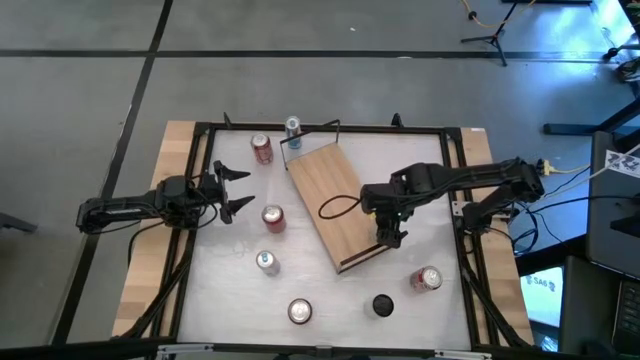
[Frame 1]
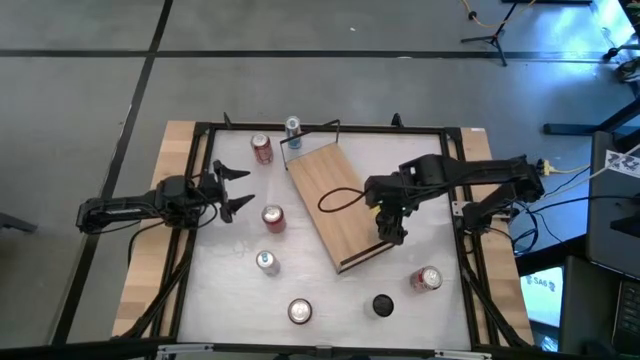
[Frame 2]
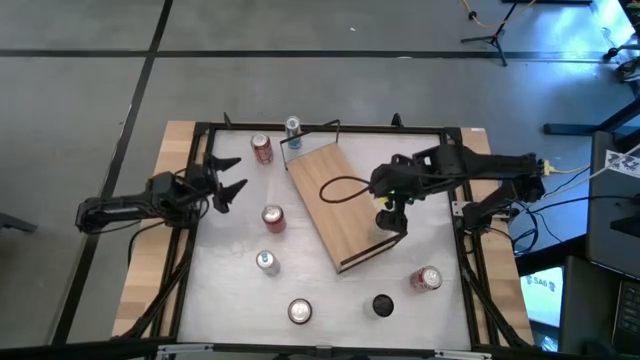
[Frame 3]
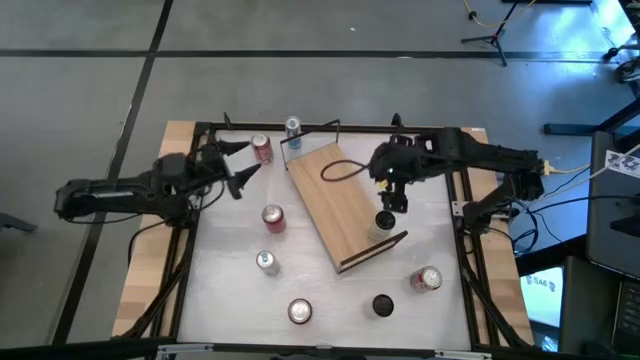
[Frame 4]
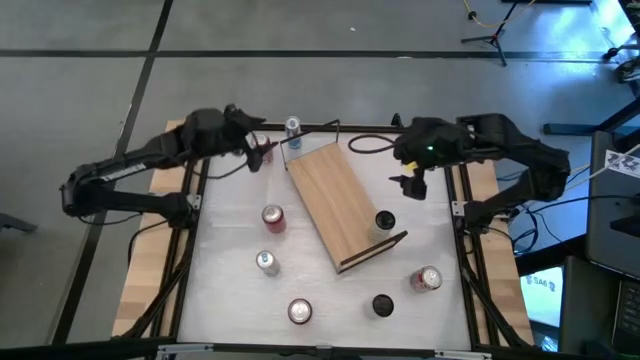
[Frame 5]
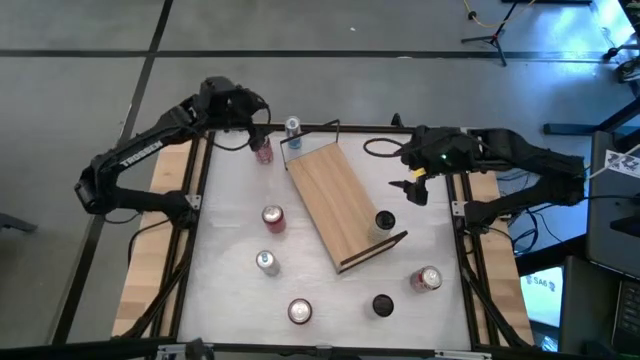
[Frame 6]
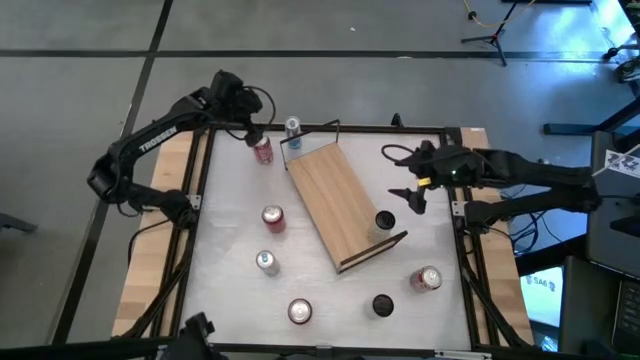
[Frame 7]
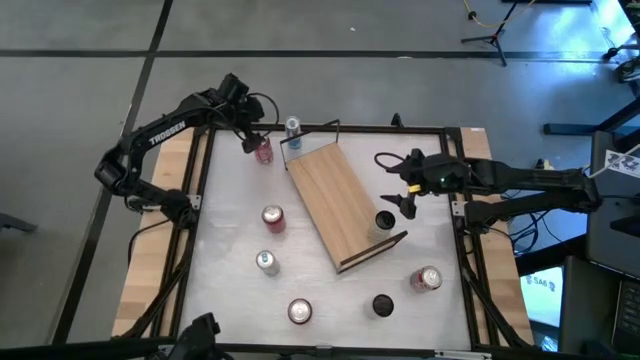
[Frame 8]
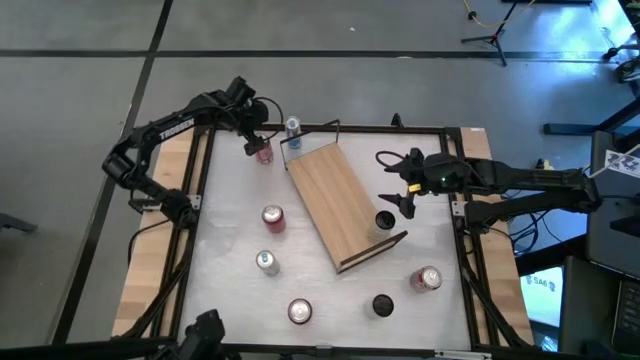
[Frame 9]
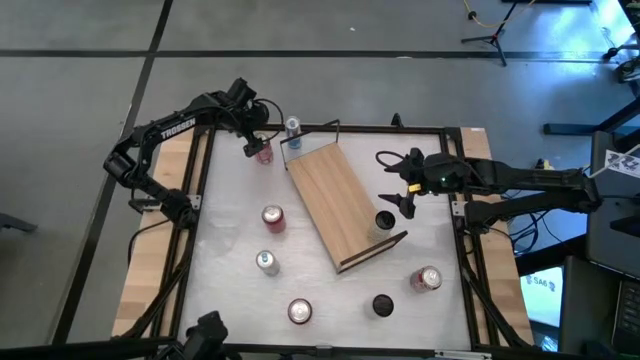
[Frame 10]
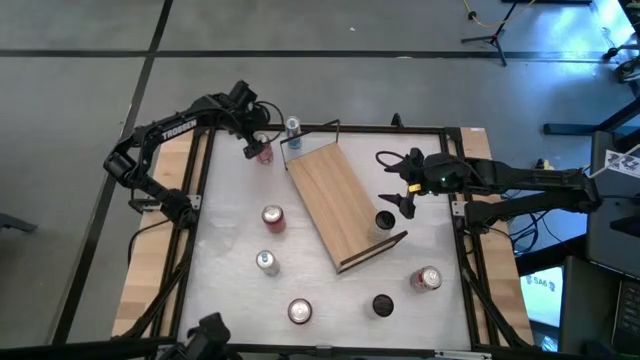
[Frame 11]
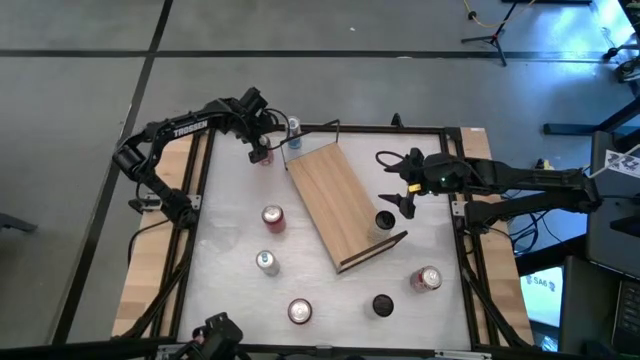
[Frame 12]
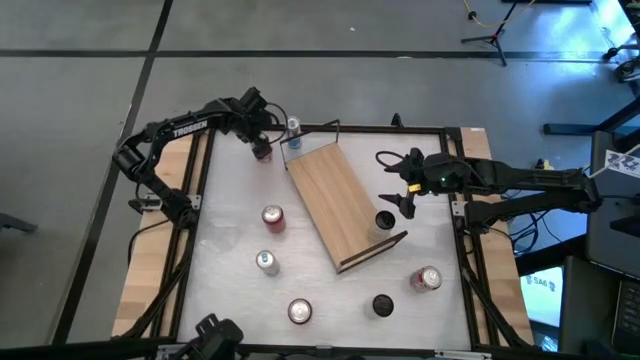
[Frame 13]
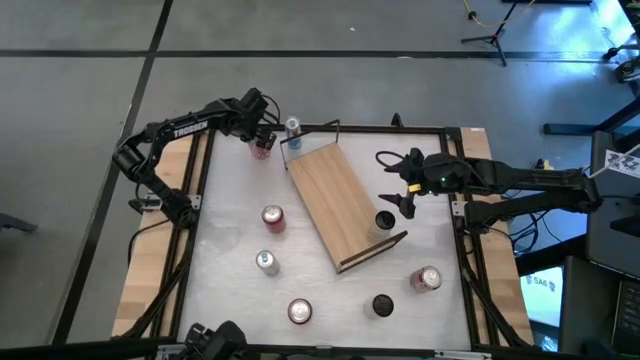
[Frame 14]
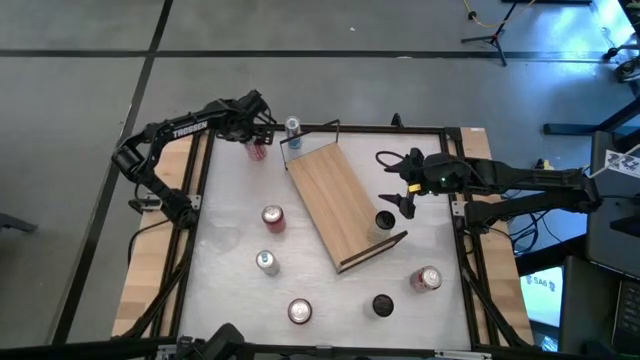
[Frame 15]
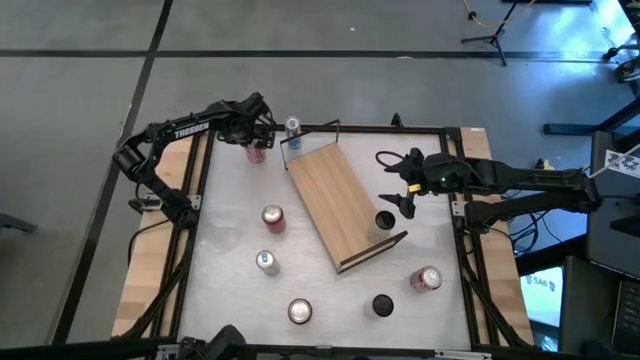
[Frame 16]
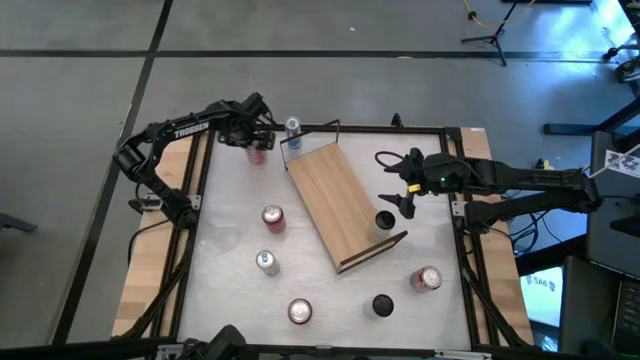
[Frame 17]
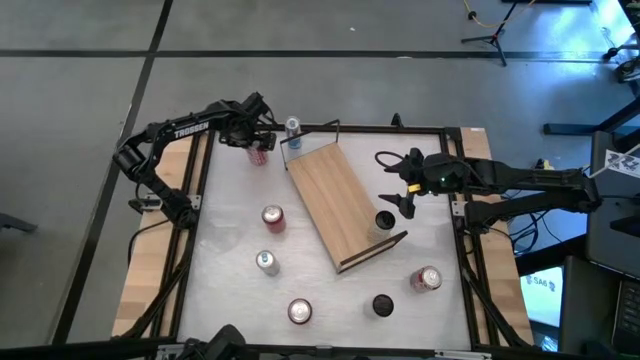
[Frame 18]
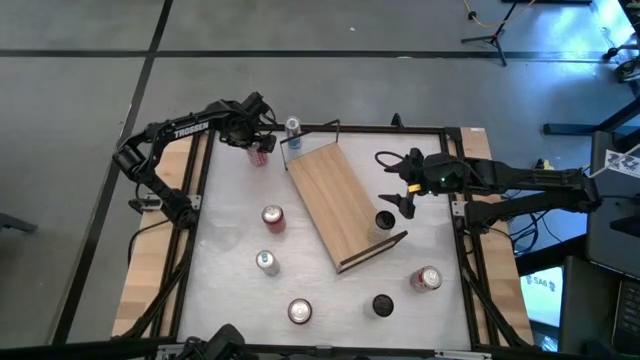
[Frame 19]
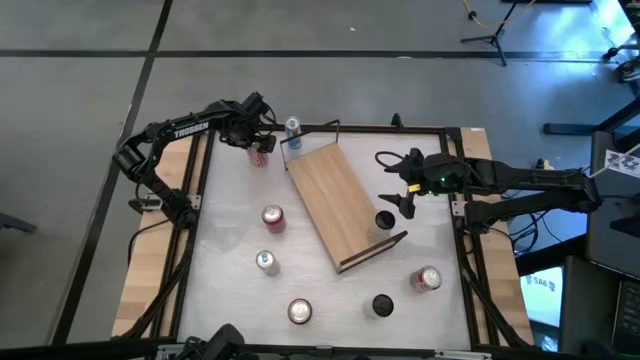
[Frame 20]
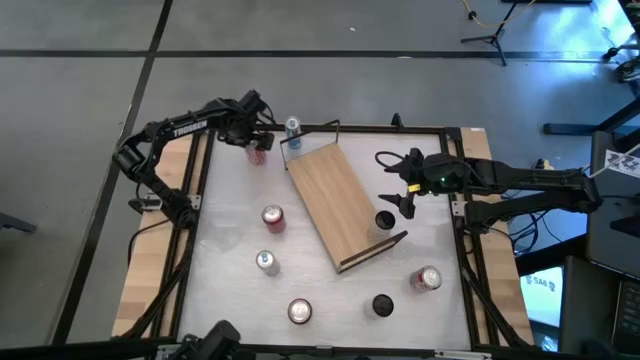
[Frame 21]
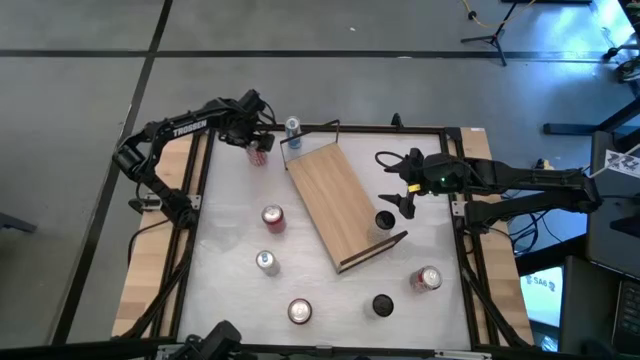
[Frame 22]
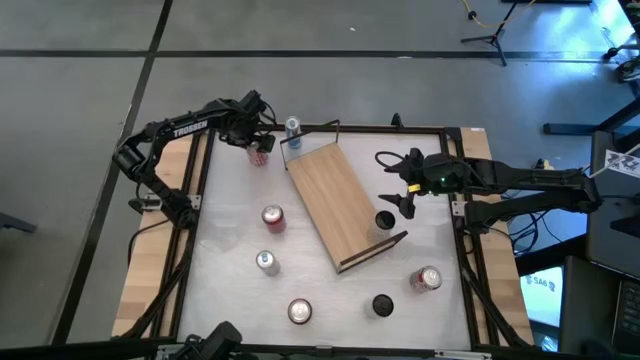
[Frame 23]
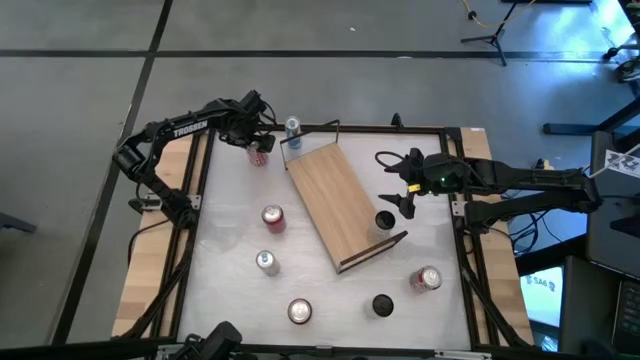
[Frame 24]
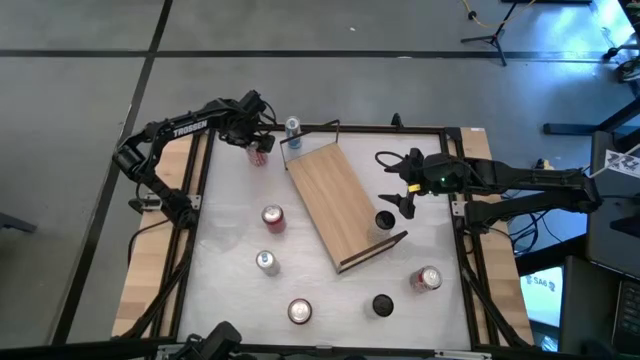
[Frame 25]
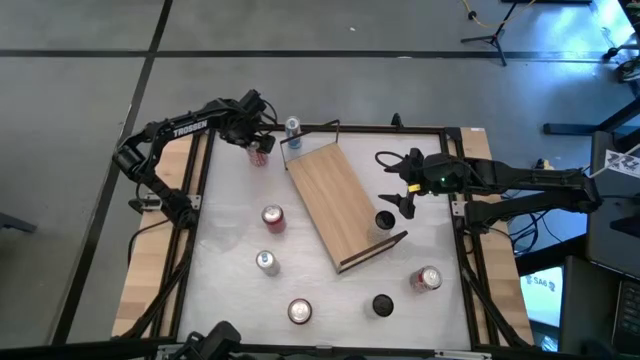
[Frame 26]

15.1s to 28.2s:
Task: Place canned beverage on shelf
Put the top red white soda can on the shelf

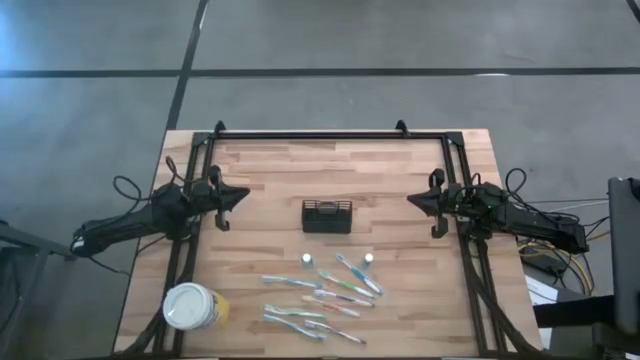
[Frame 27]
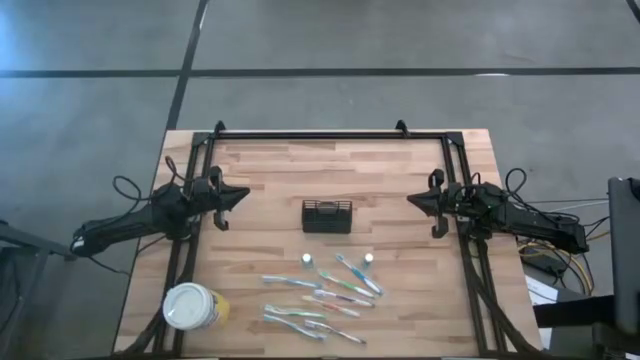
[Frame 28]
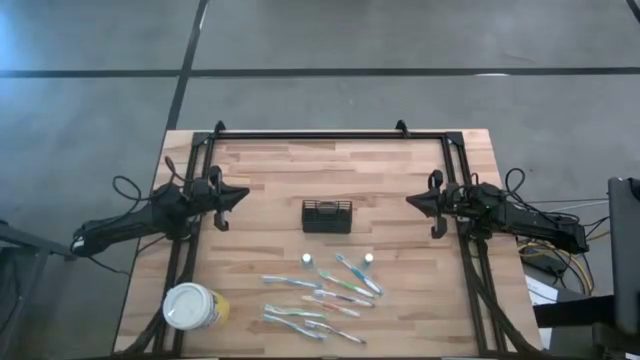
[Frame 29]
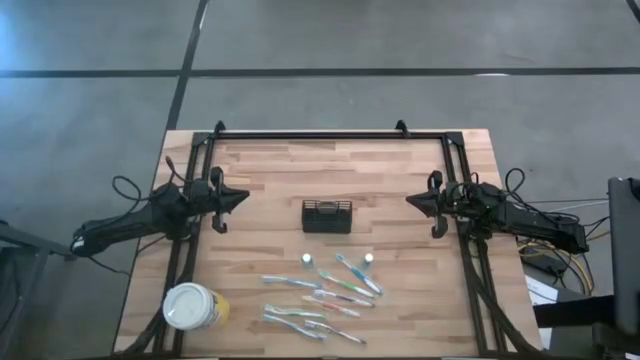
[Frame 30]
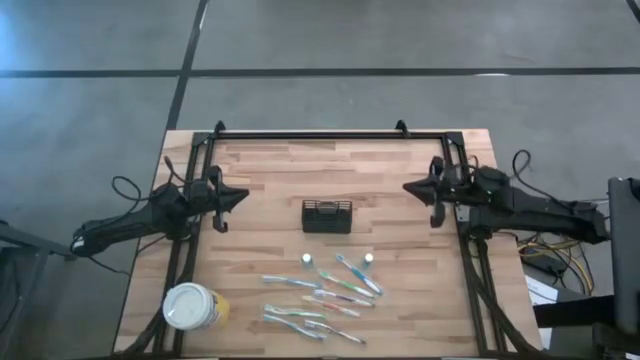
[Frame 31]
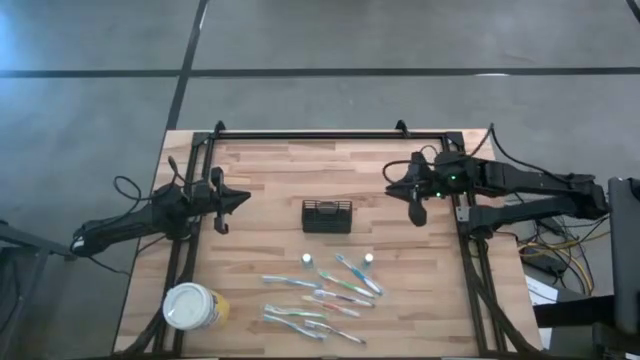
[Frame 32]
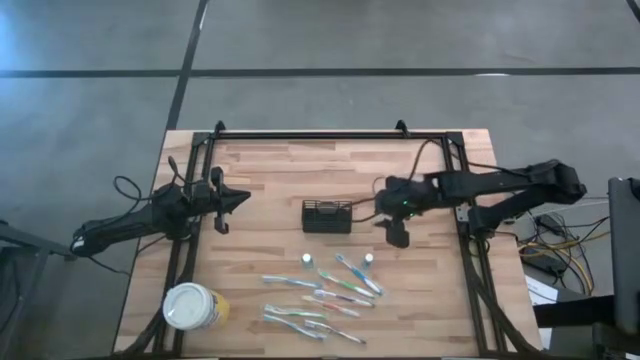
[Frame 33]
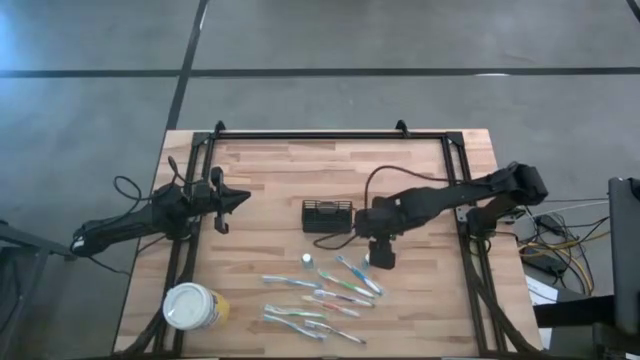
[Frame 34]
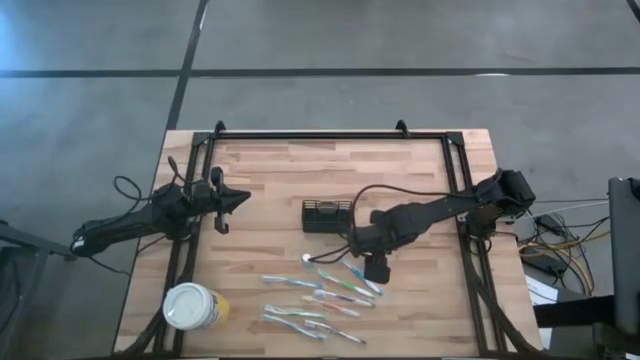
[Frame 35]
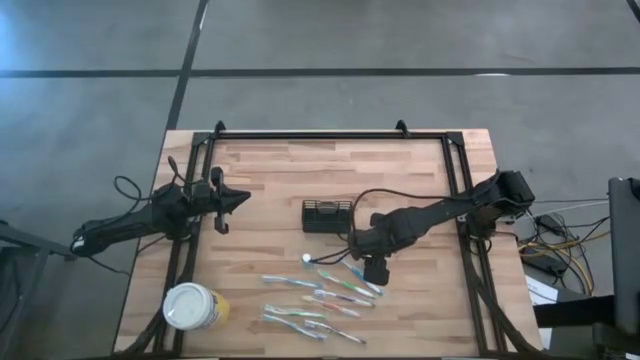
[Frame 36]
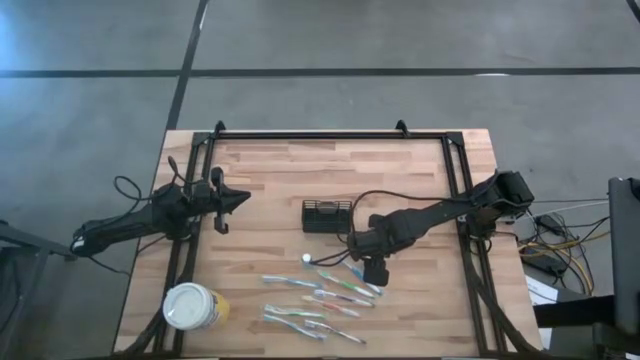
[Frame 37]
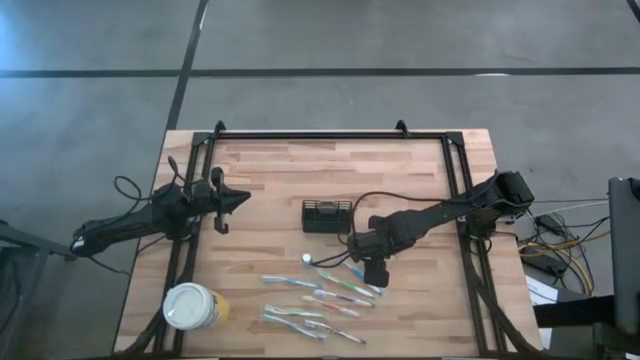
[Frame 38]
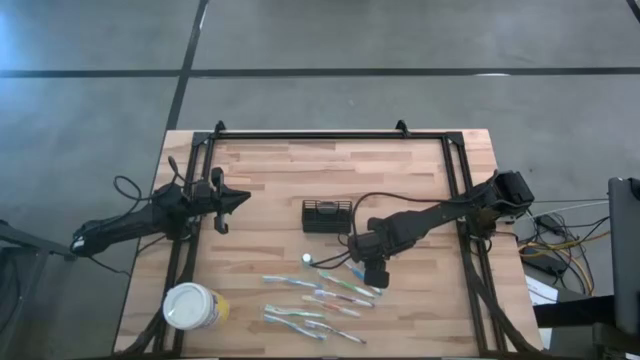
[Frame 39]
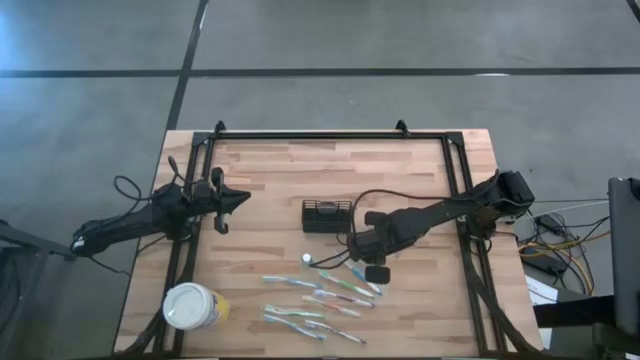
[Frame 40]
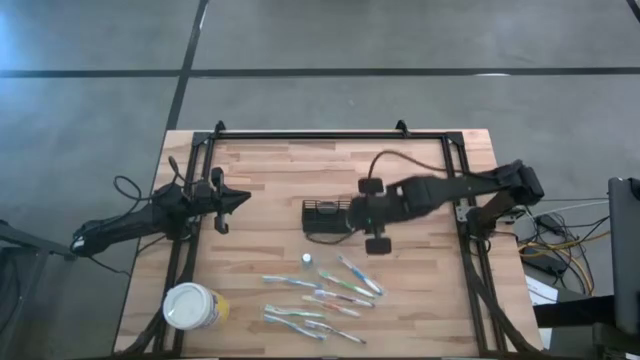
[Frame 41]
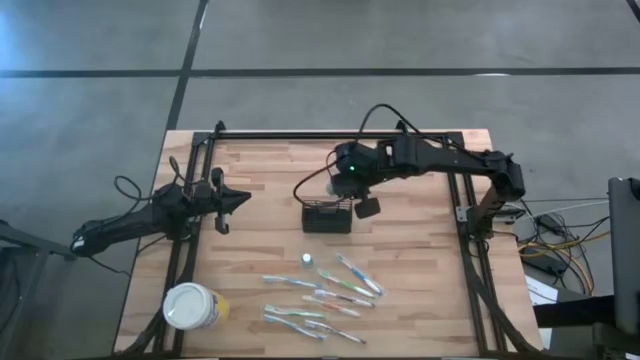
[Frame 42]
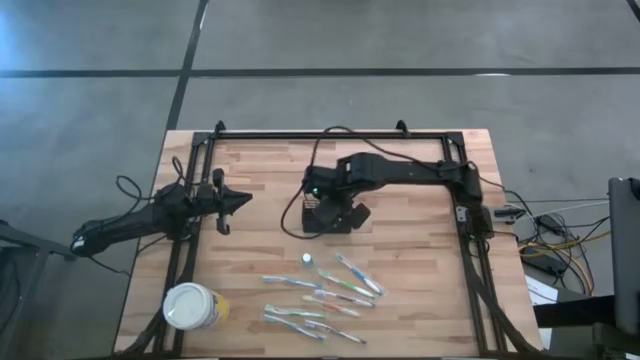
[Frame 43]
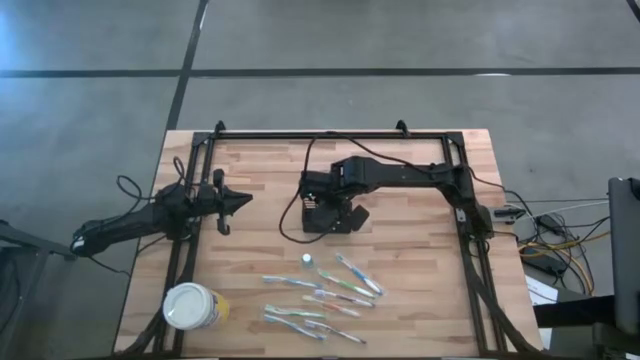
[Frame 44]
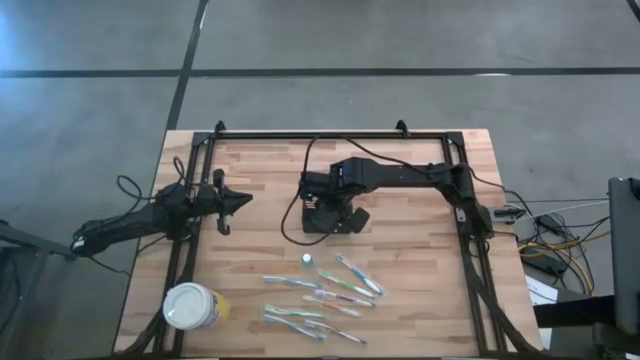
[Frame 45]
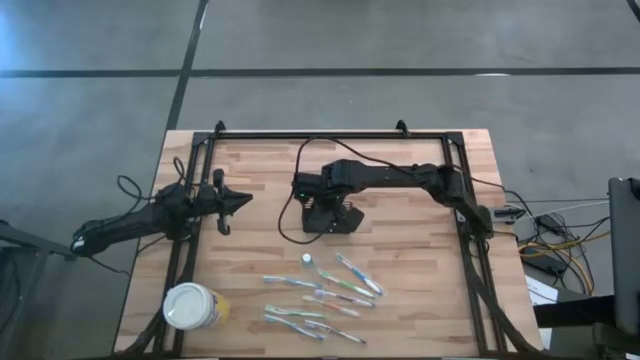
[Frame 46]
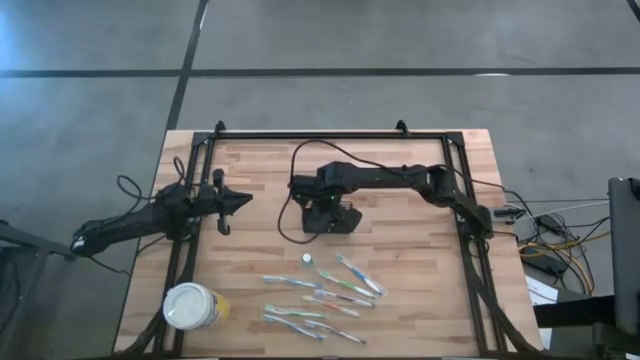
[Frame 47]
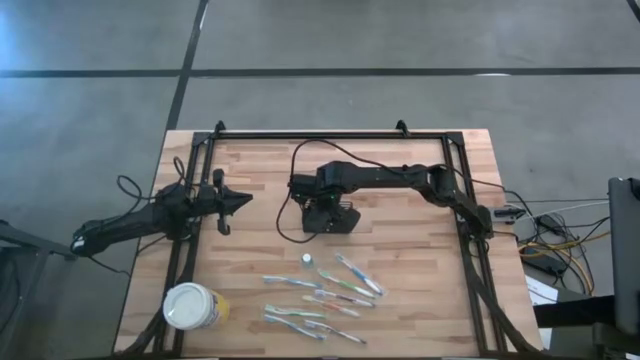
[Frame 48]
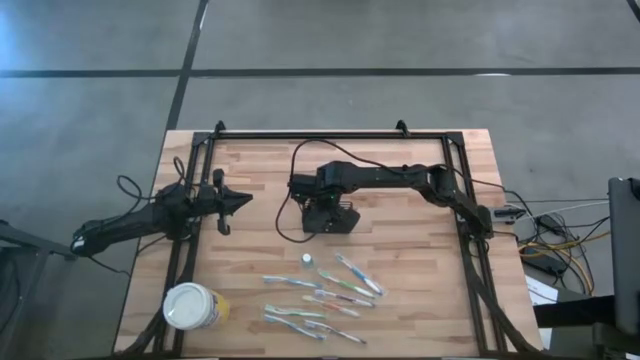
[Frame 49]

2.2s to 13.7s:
Task: Pick & Place toothbrushing station
Put the right mouthwash into the wire organizer
